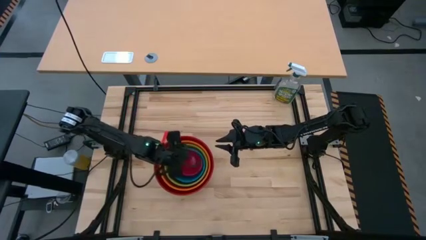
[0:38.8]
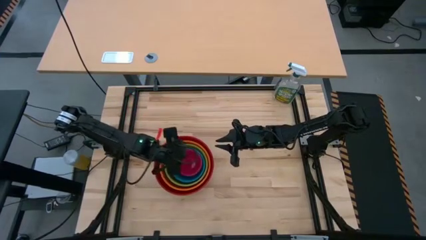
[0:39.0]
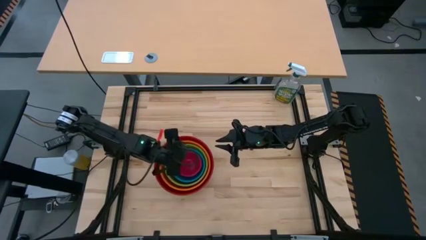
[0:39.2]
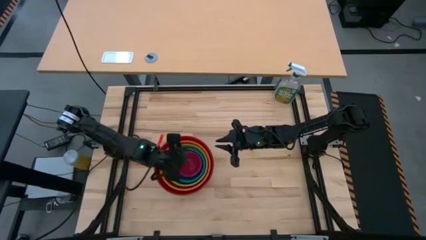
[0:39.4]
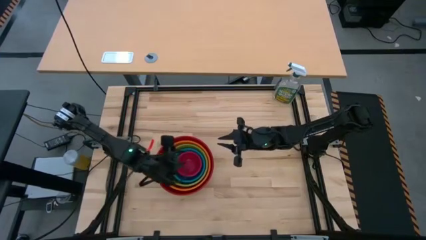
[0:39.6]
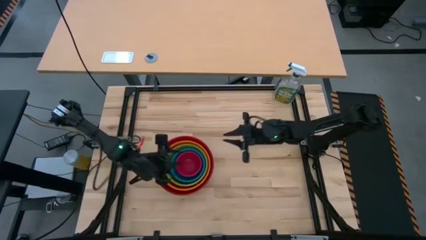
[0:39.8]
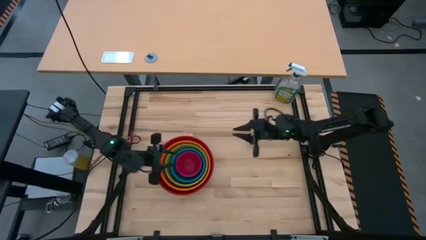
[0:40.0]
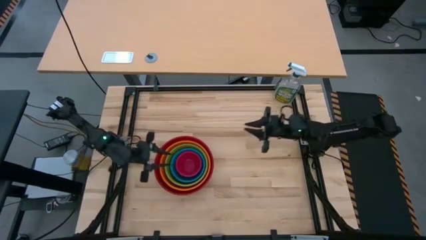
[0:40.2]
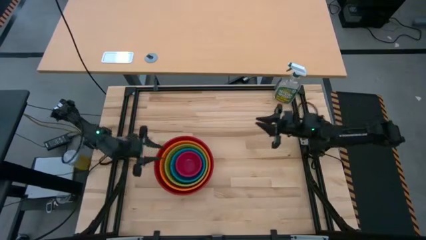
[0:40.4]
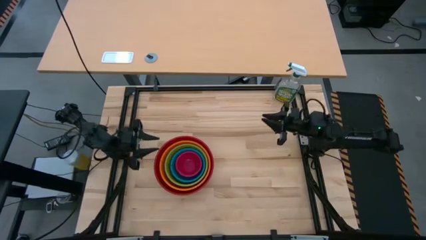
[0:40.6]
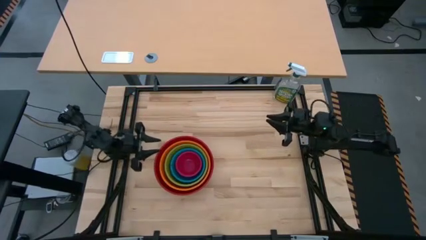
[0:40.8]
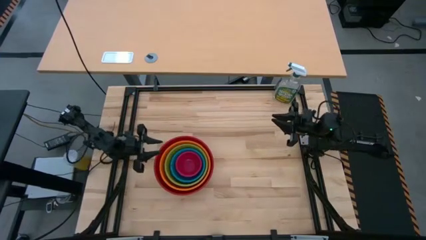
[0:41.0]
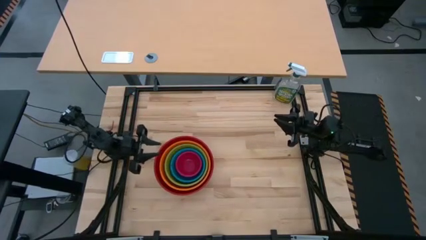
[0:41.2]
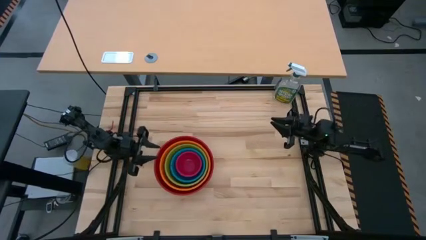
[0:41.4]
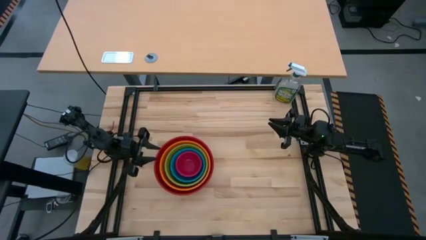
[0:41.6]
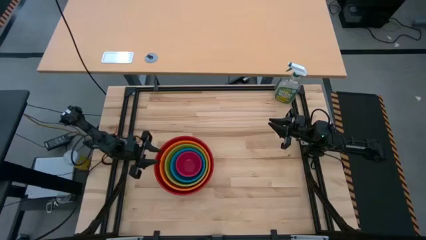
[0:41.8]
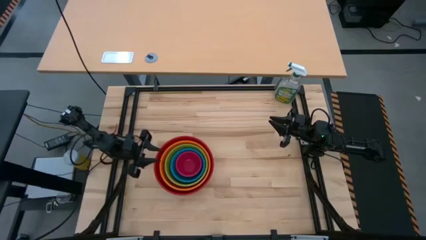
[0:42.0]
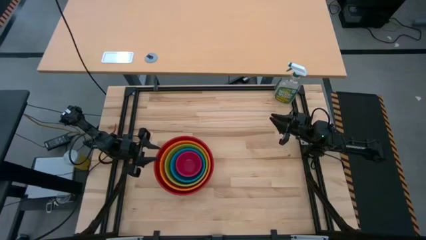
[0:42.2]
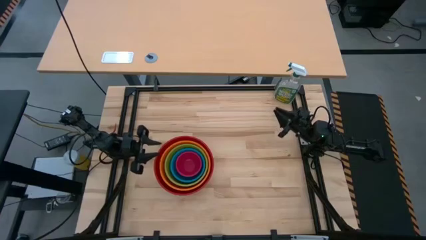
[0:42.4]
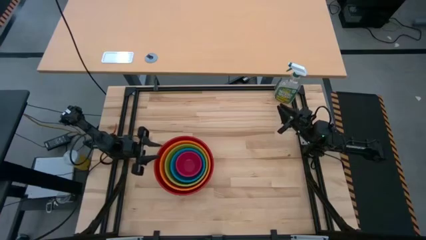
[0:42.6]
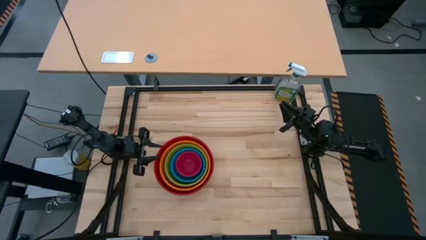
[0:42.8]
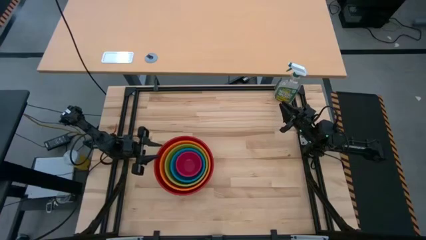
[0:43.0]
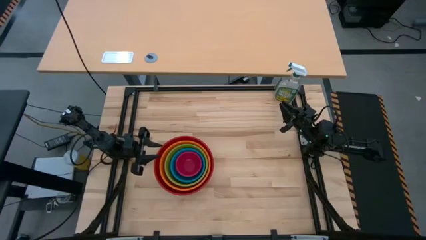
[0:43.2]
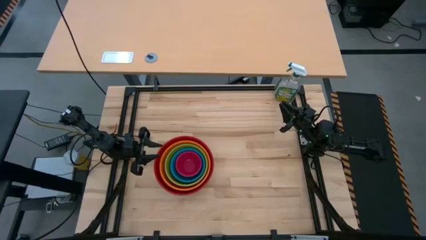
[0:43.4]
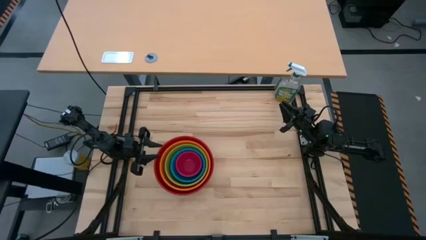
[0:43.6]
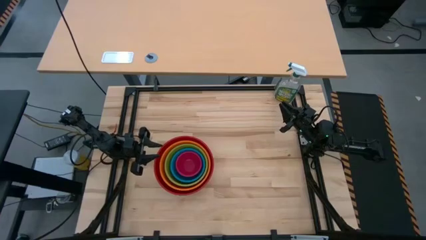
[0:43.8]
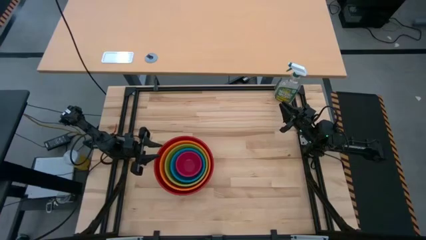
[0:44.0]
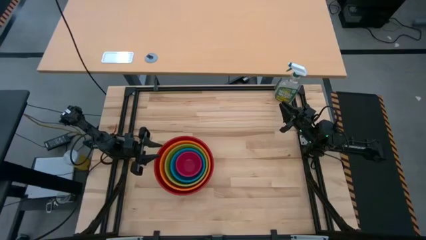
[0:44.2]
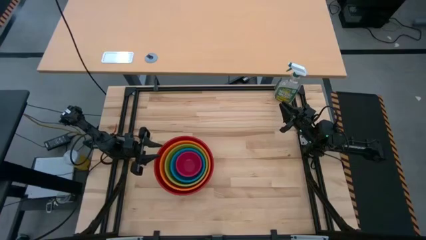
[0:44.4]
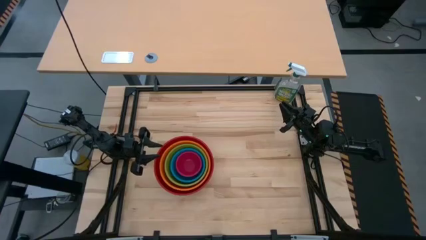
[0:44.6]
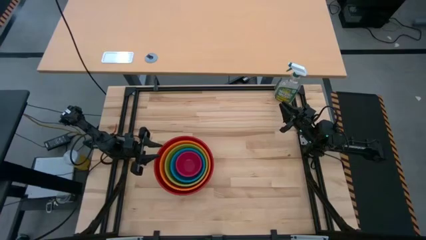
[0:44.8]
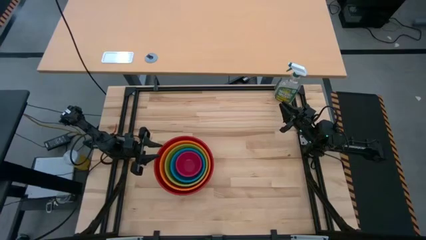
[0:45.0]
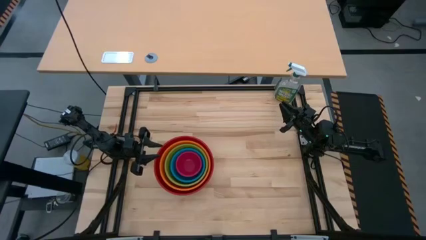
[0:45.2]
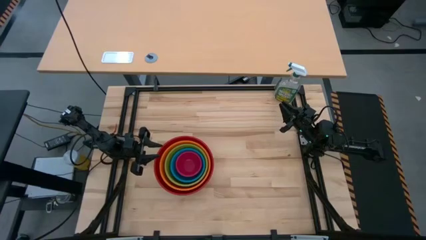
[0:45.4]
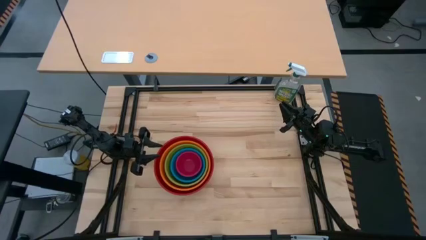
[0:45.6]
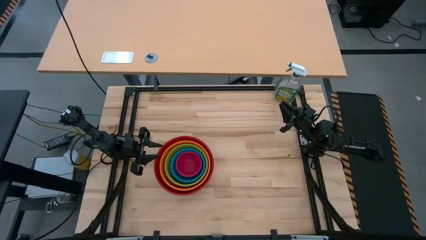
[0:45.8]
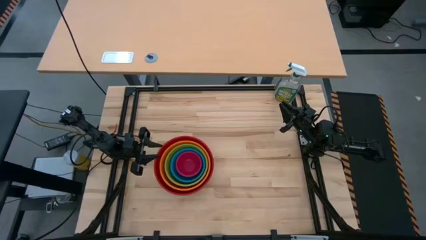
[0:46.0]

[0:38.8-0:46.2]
Return to Home Position
